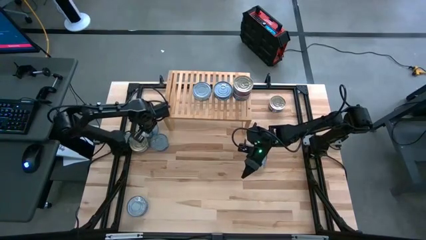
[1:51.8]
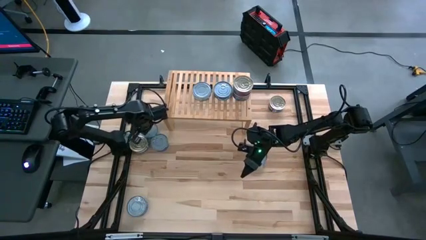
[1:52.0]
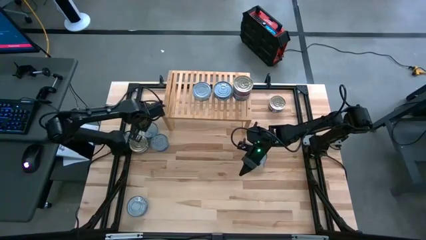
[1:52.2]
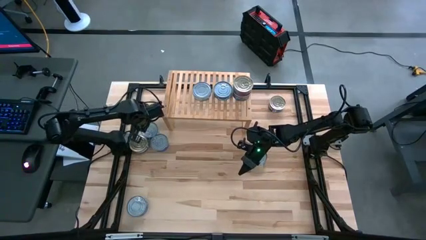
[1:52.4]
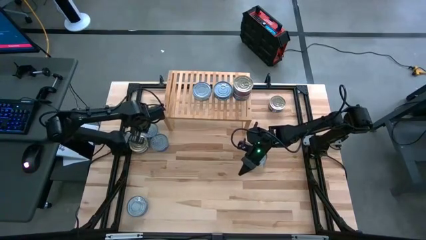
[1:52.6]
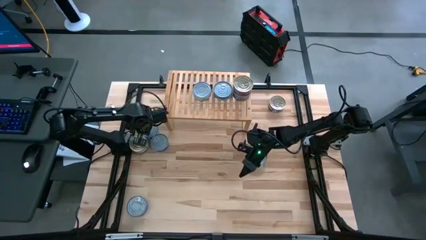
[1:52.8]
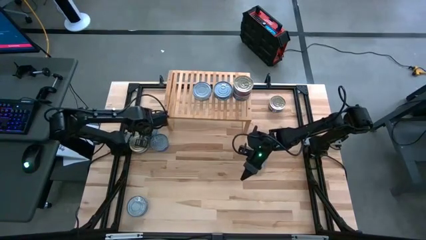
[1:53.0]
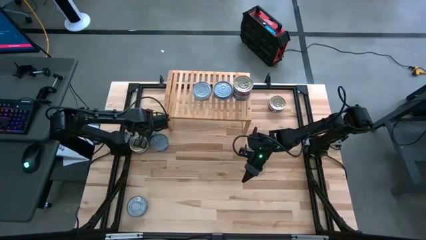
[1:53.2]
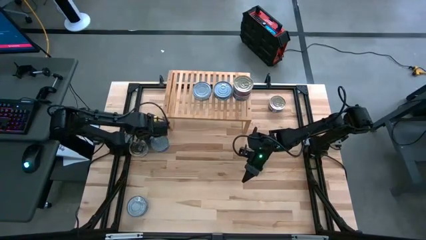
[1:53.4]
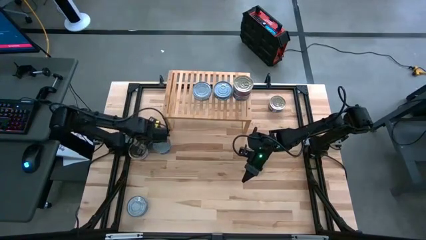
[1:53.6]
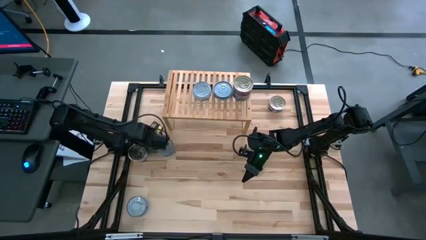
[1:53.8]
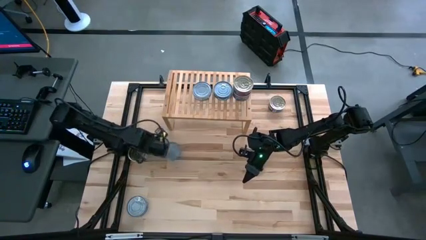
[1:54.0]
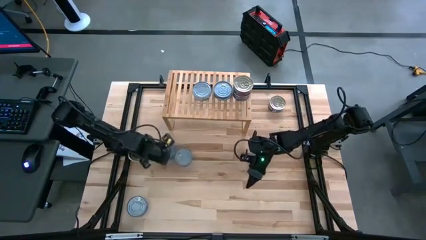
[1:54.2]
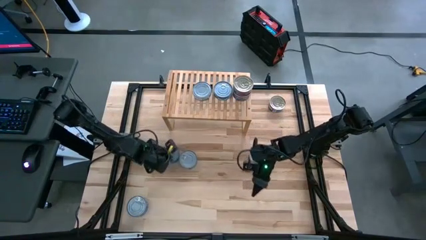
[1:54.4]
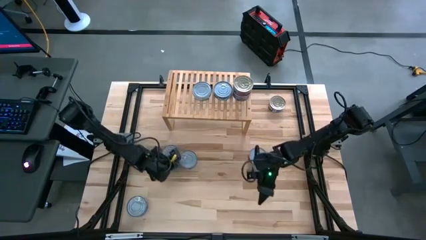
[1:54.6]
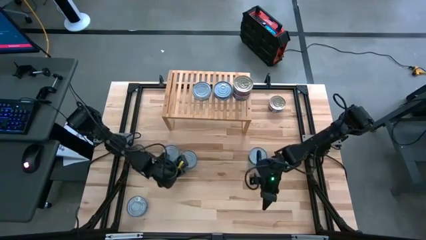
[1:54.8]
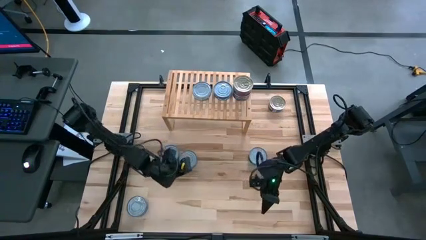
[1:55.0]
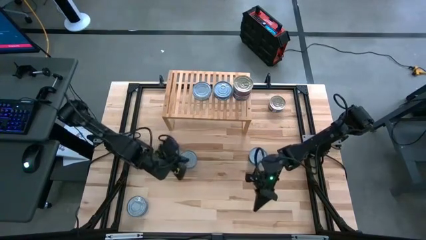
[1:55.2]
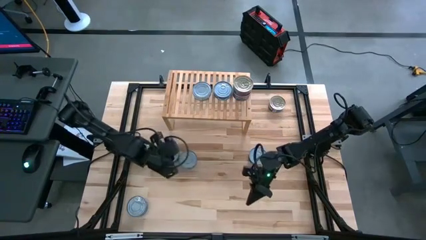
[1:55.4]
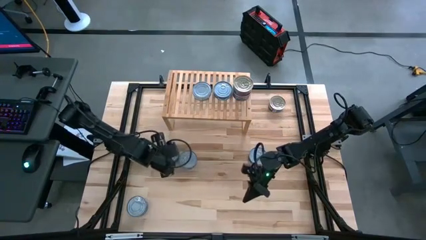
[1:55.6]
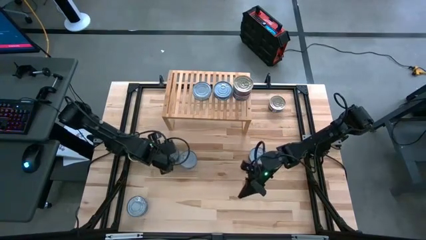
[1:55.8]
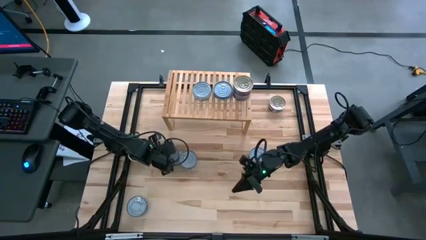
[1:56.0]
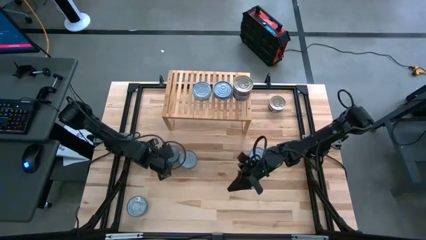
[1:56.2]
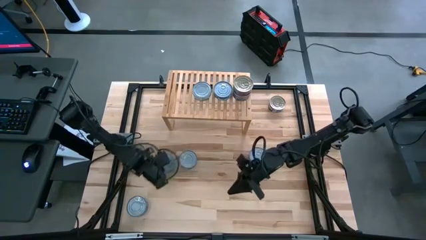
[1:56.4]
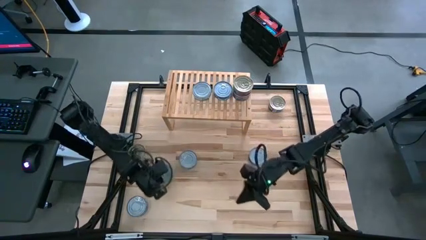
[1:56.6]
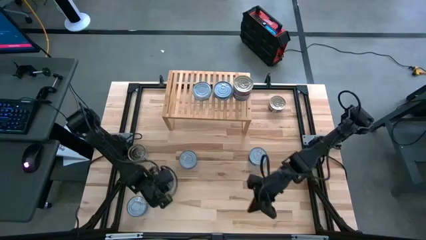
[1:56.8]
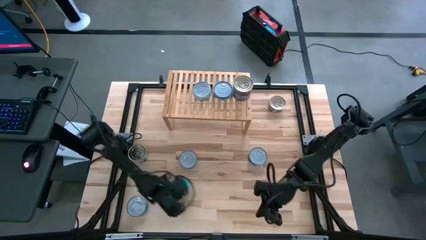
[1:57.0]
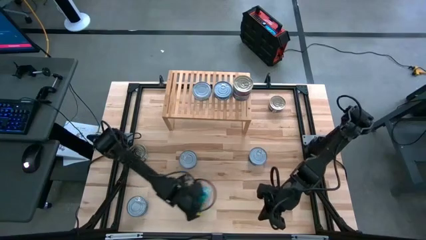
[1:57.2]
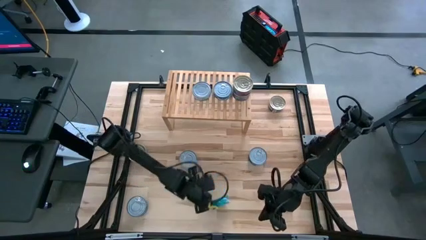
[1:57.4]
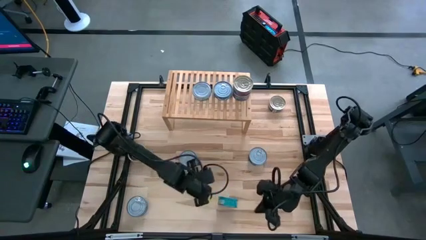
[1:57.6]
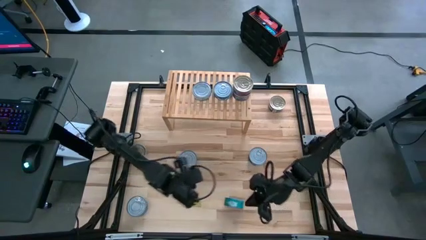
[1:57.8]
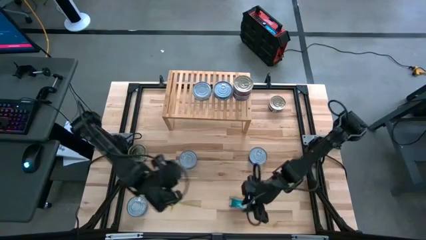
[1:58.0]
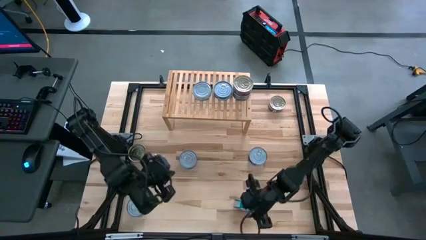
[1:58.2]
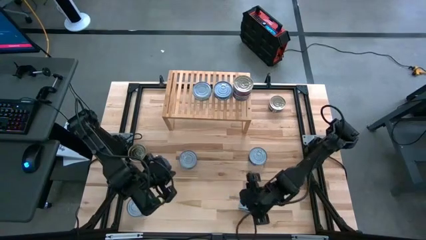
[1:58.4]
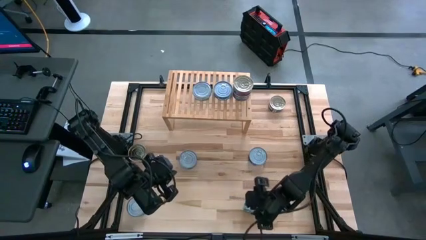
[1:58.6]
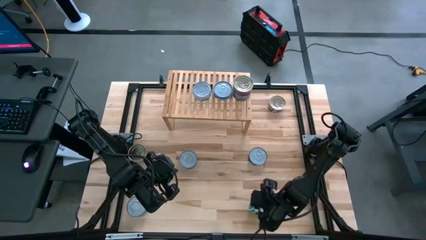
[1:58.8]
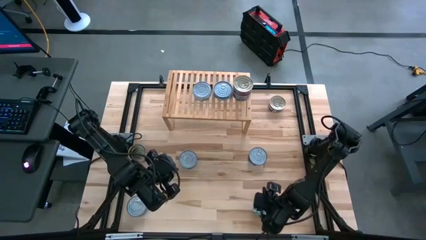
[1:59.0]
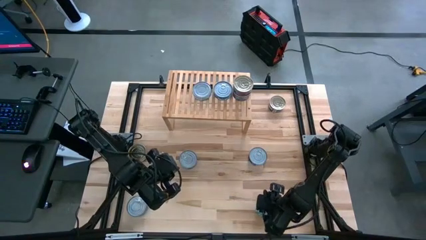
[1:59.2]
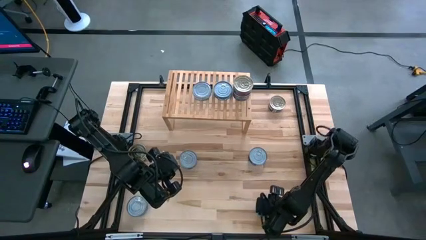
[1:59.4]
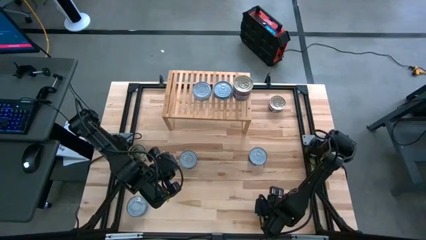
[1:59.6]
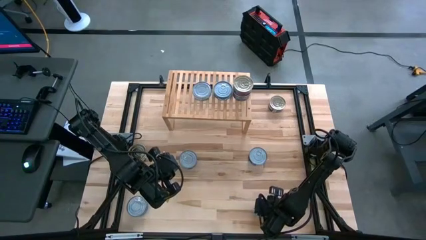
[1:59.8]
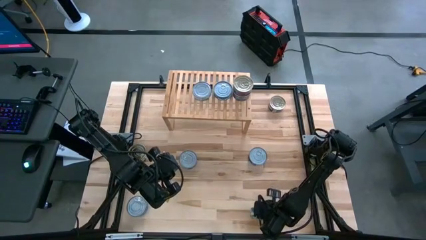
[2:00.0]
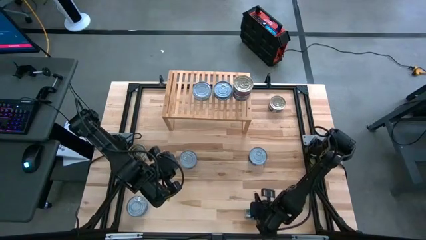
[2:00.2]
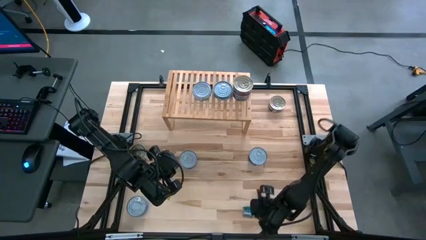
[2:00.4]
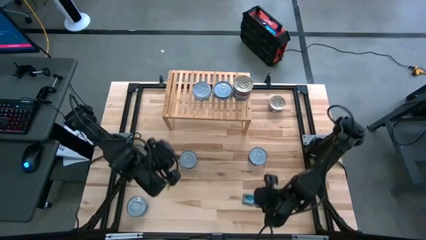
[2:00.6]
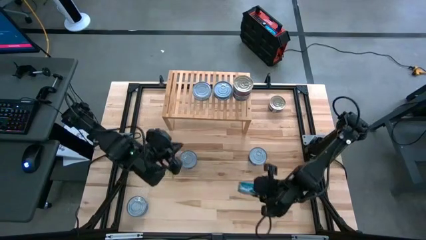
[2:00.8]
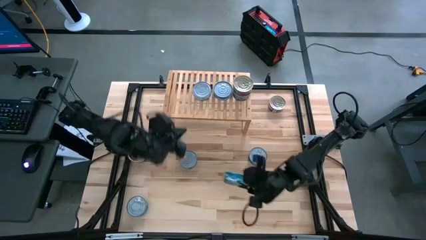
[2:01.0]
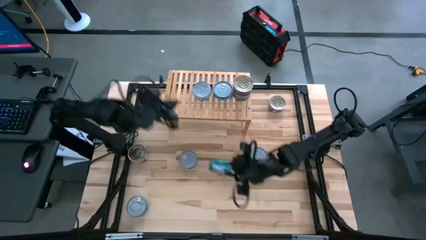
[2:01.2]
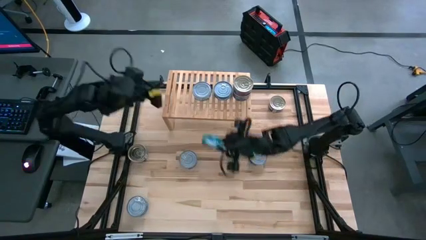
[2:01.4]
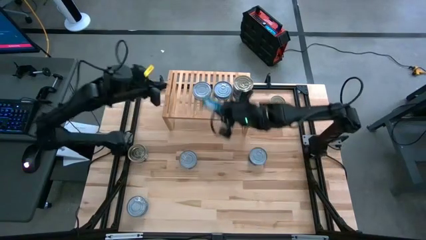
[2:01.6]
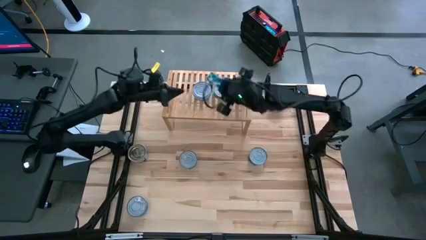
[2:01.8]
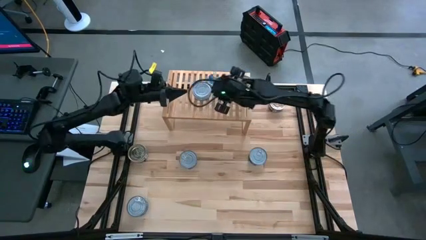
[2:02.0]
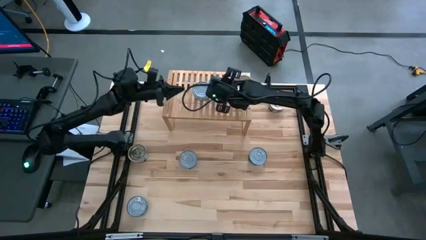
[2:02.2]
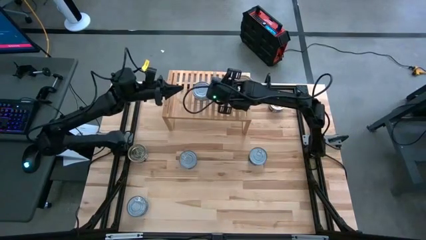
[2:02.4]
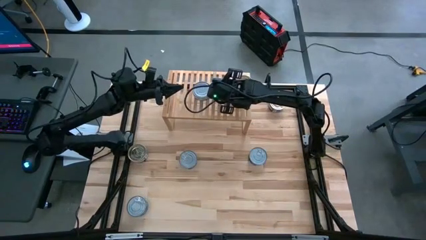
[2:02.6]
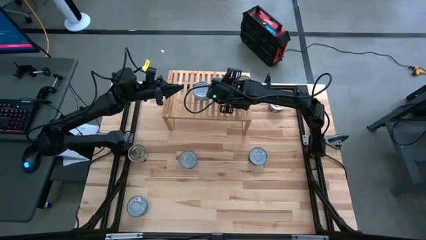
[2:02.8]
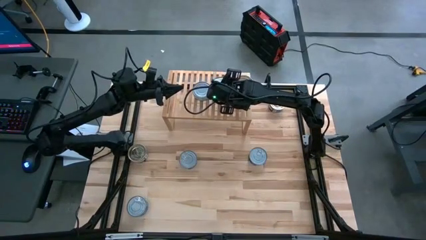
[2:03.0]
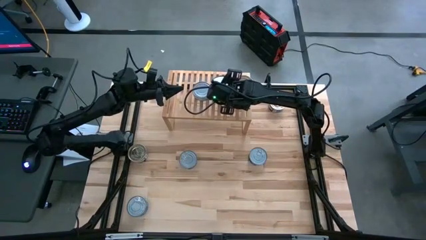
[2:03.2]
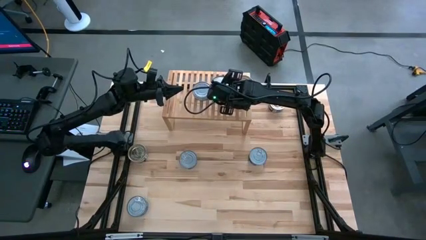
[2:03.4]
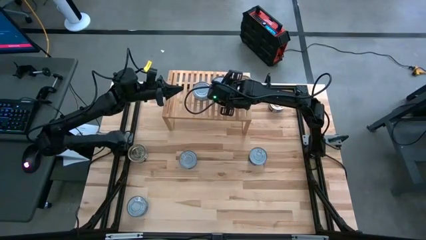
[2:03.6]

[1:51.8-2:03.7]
Task: Stack canned seafood by type on shelf
Stack the green and blue tuna can on top of the other green and blue tuna can on the shelf

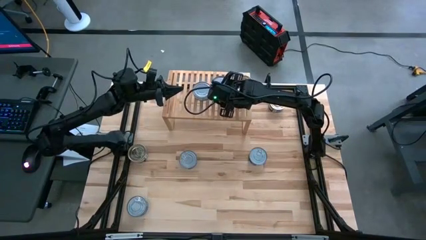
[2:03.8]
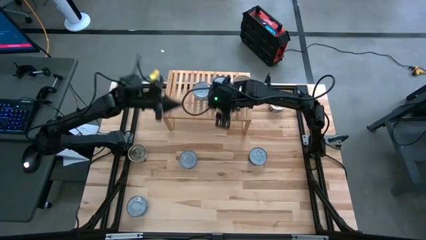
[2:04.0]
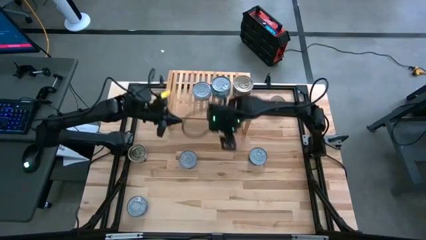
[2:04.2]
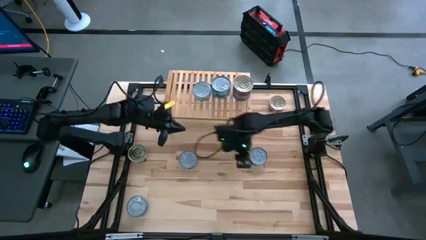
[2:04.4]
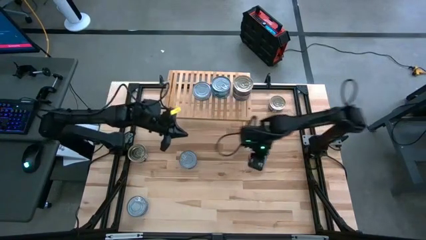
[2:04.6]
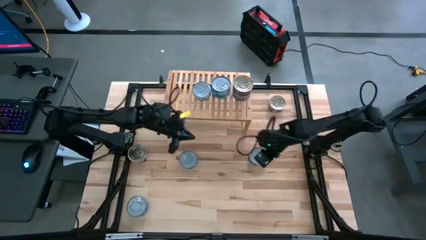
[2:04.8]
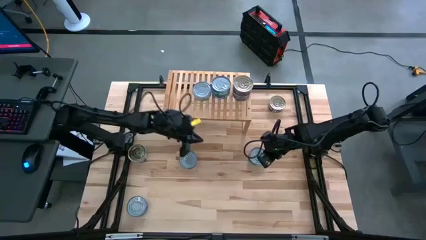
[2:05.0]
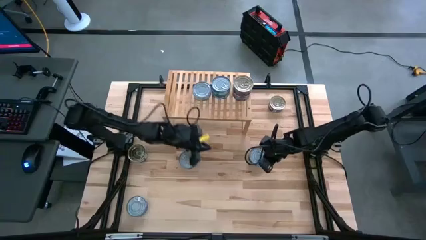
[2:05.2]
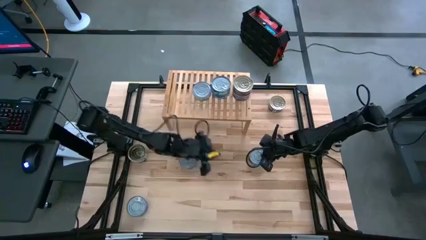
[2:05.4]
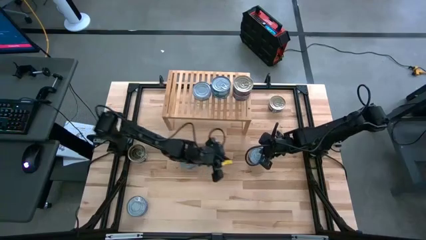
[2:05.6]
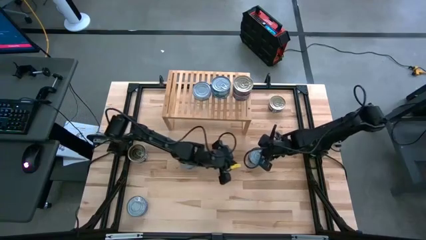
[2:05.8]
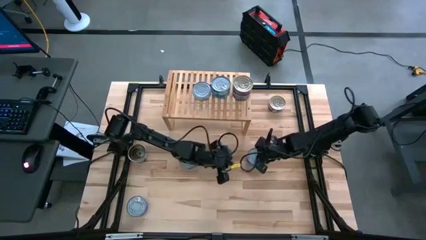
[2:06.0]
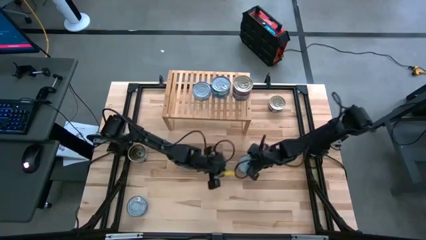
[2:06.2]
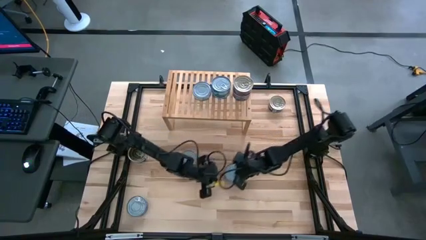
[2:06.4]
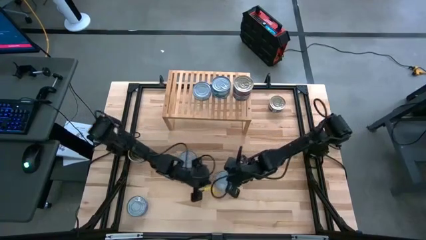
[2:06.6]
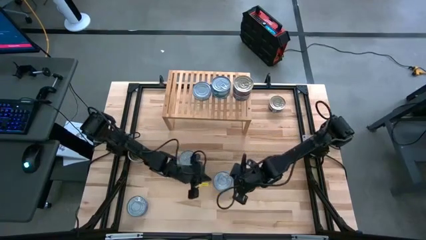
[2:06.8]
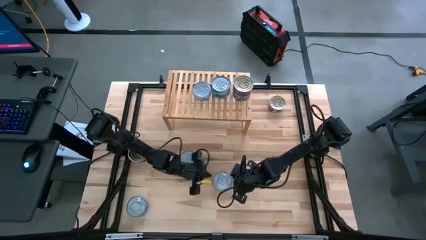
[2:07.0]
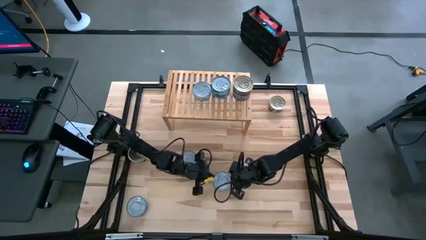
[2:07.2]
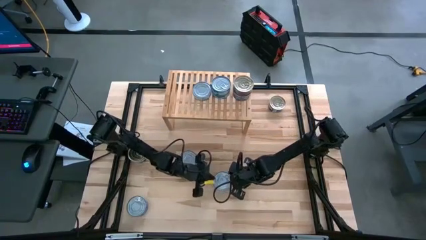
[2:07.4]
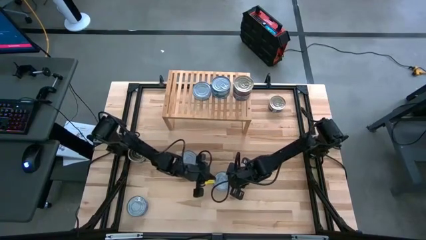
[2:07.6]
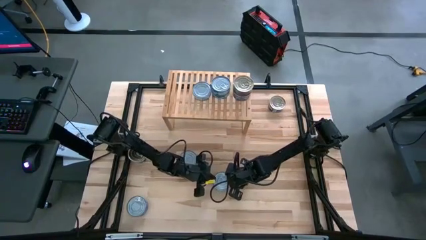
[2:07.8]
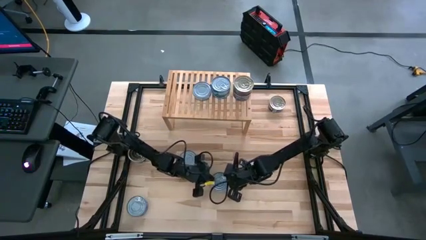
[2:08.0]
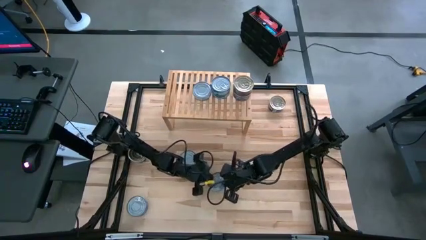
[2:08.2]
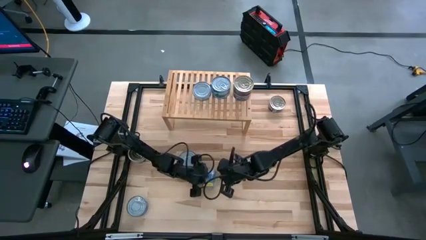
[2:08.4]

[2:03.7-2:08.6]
Put the blue tuna can on the shelf
